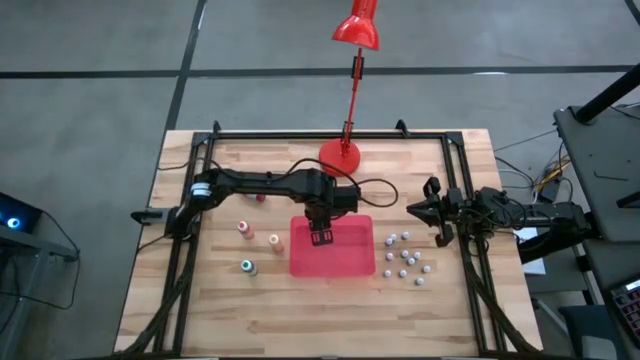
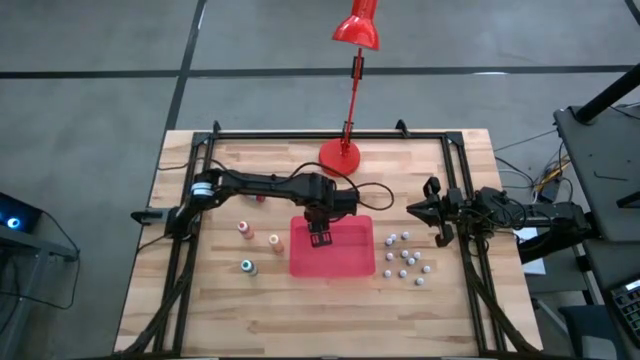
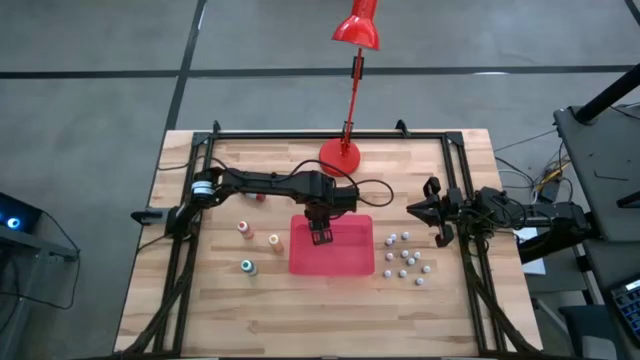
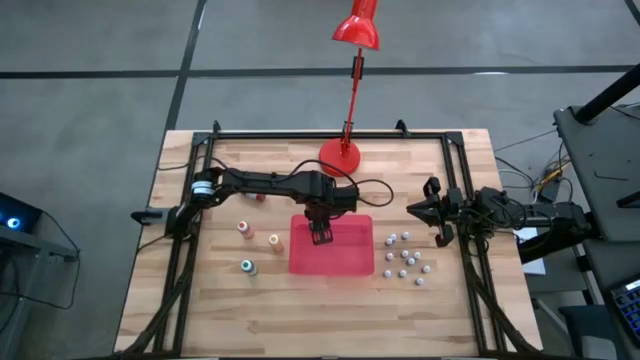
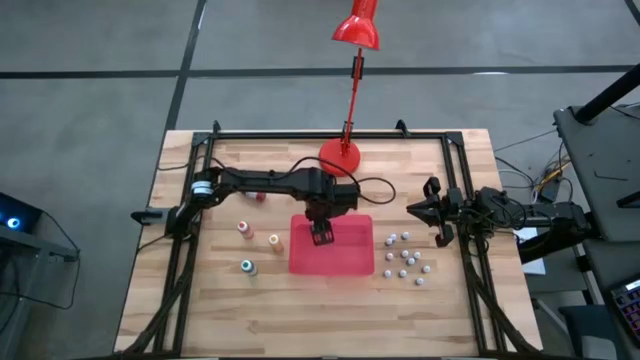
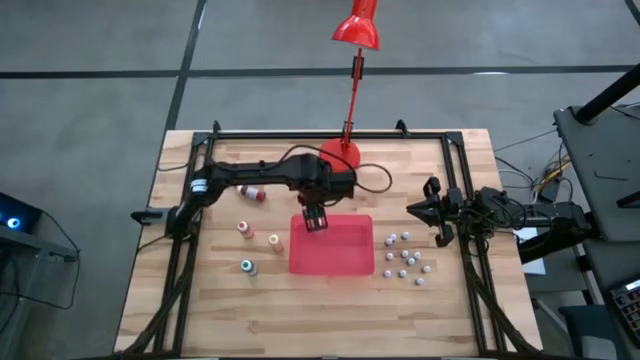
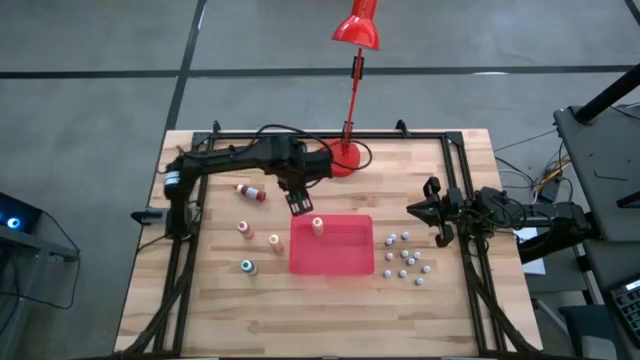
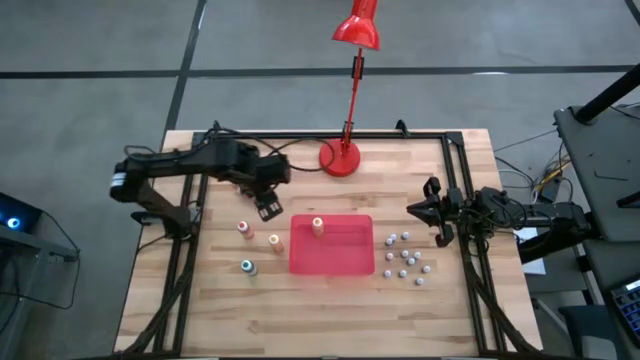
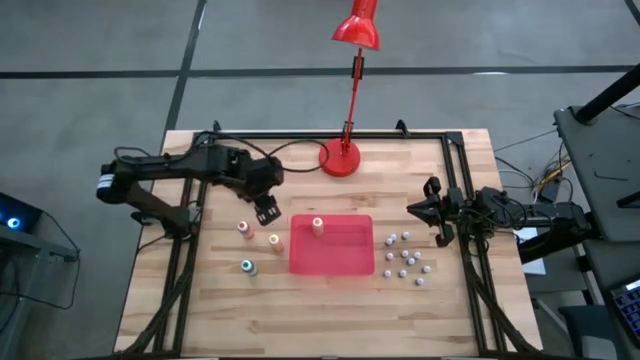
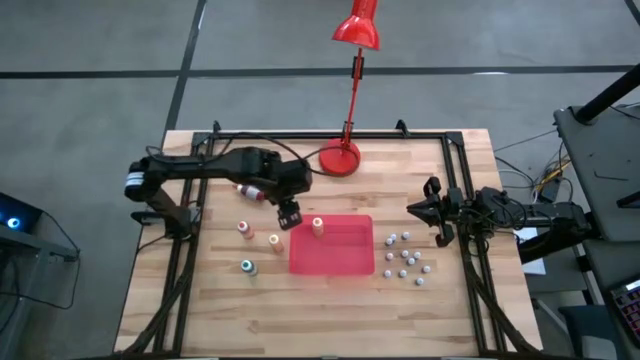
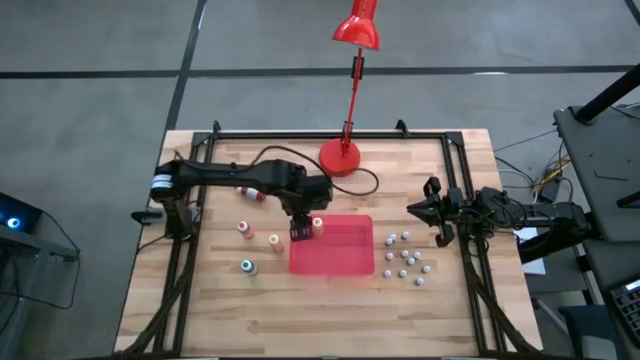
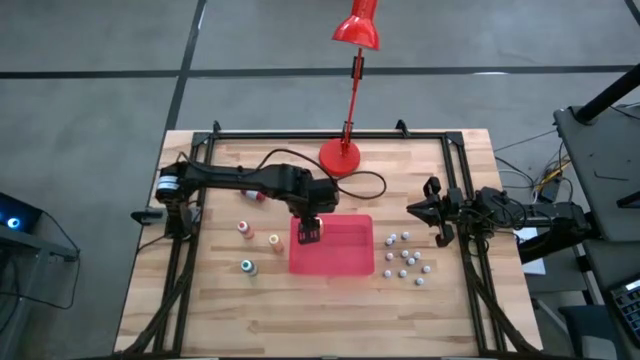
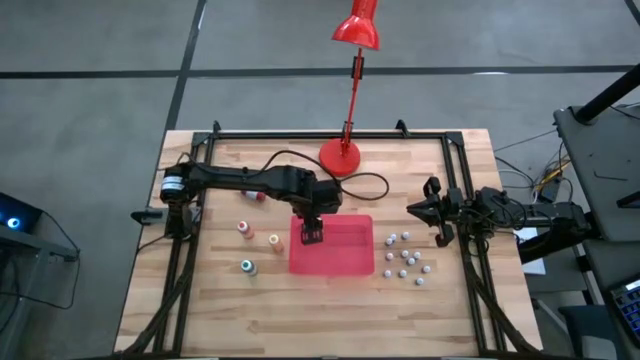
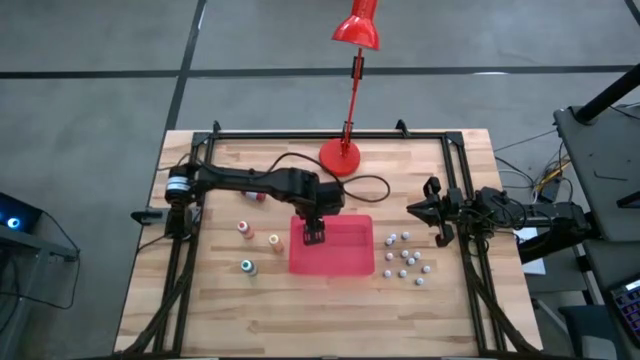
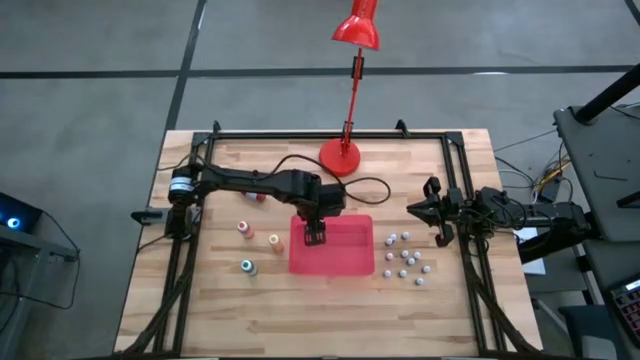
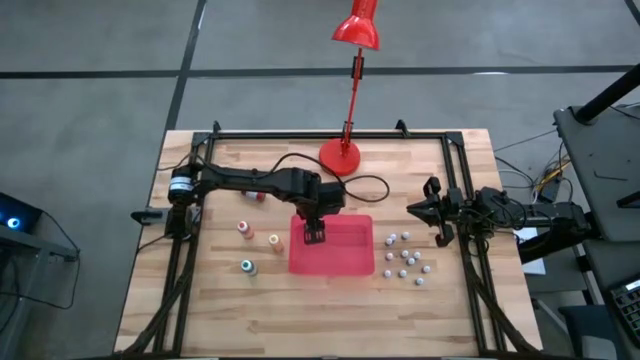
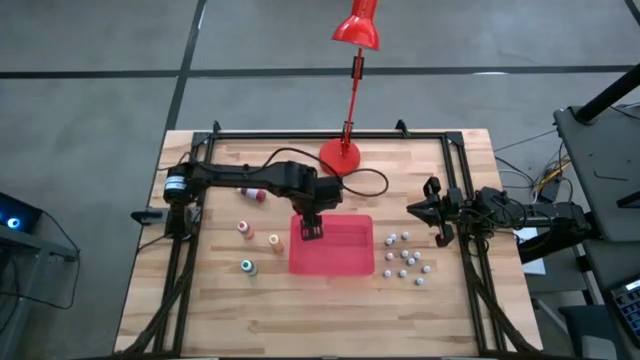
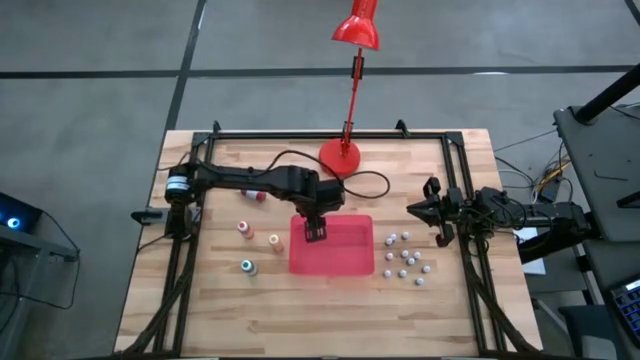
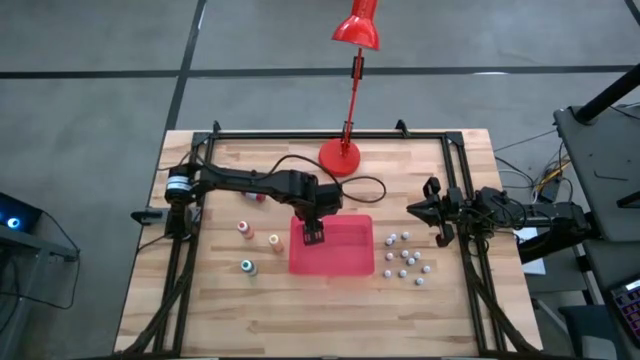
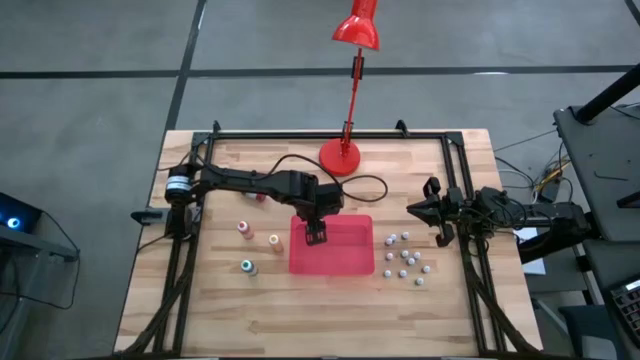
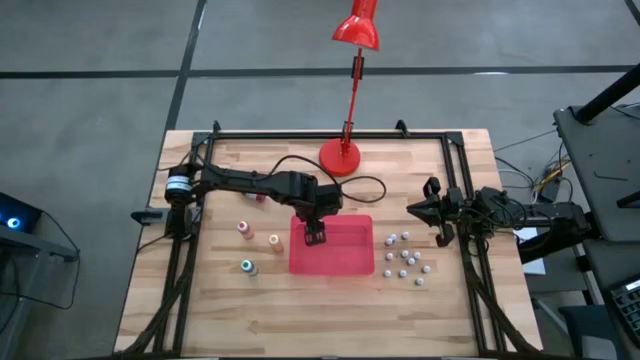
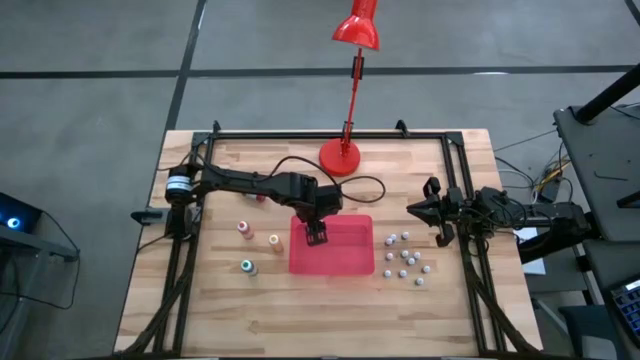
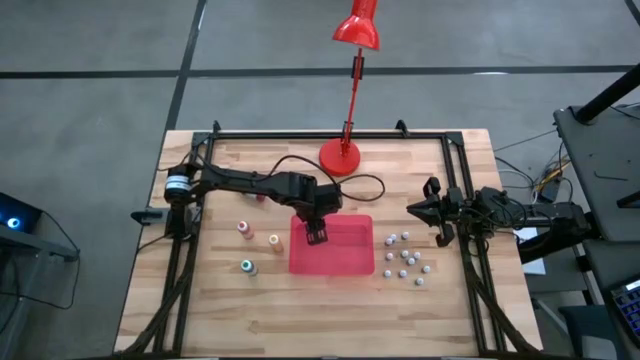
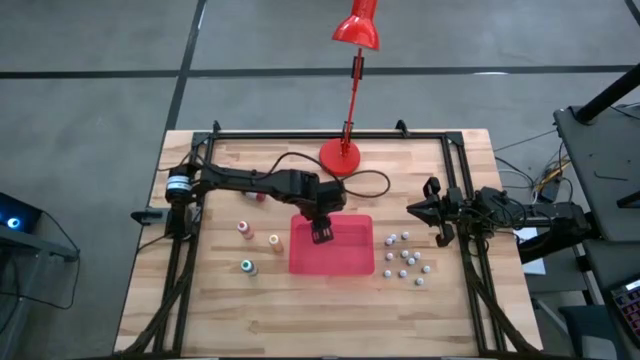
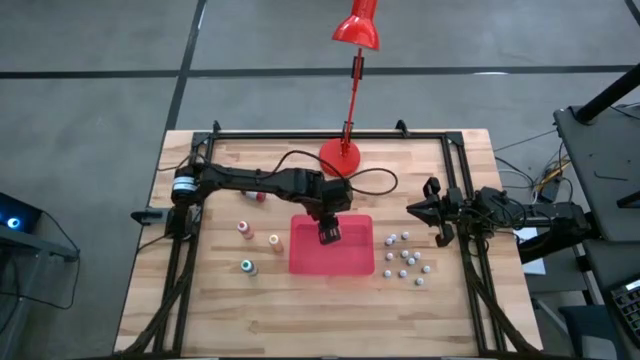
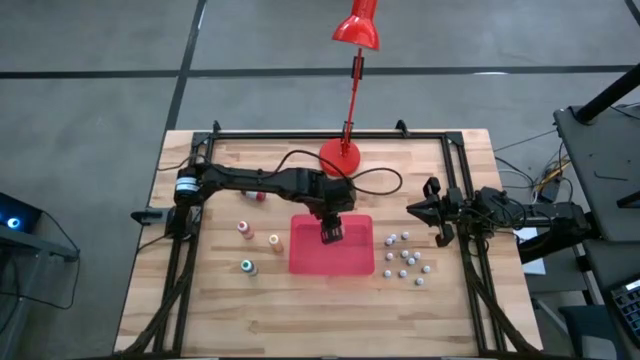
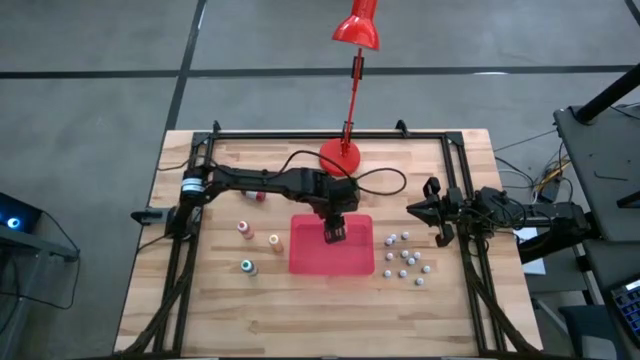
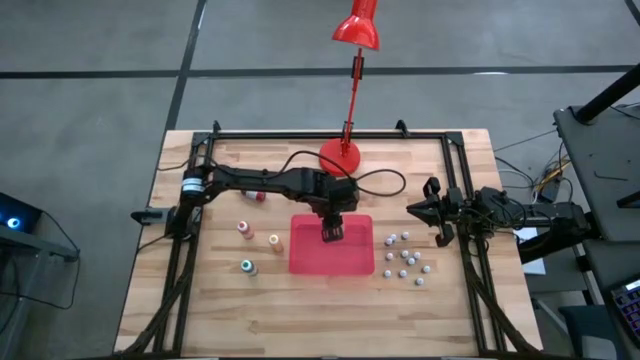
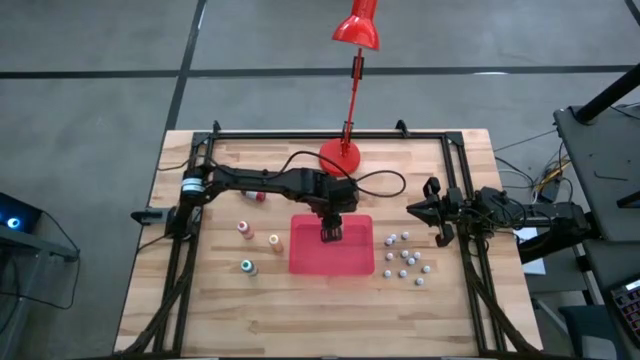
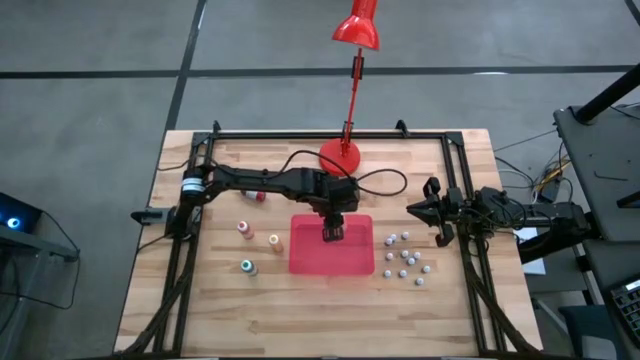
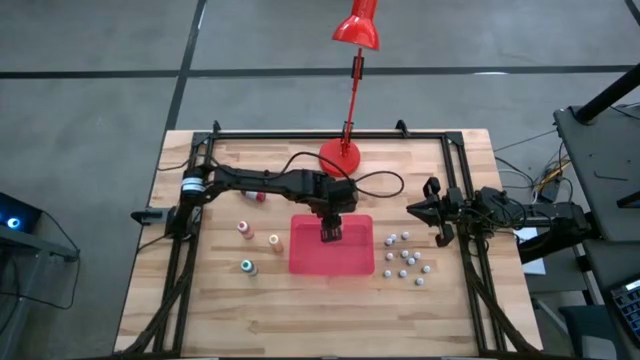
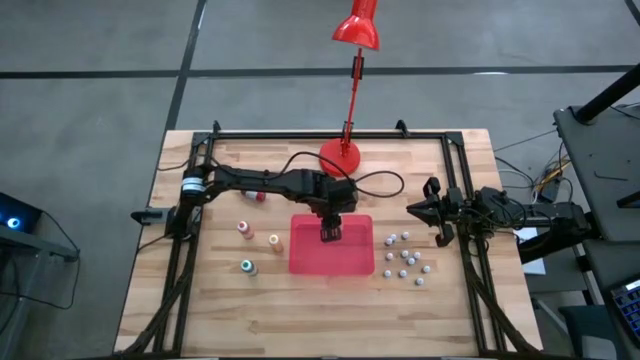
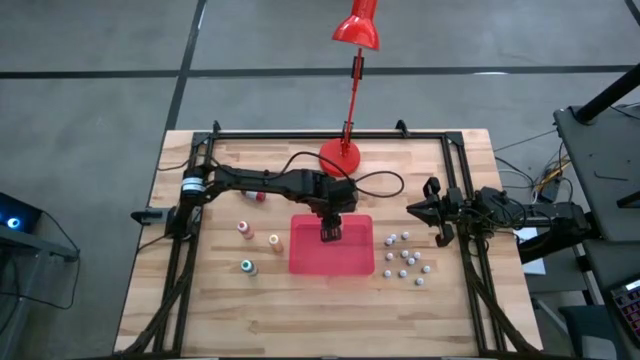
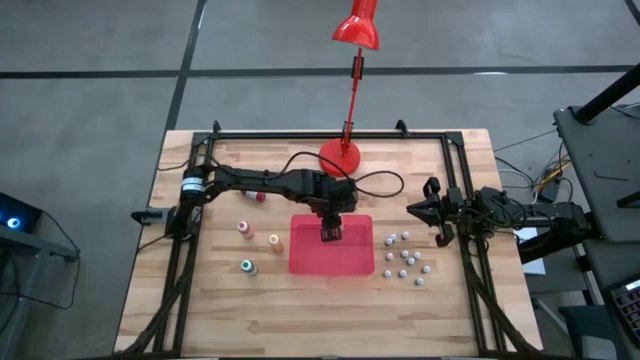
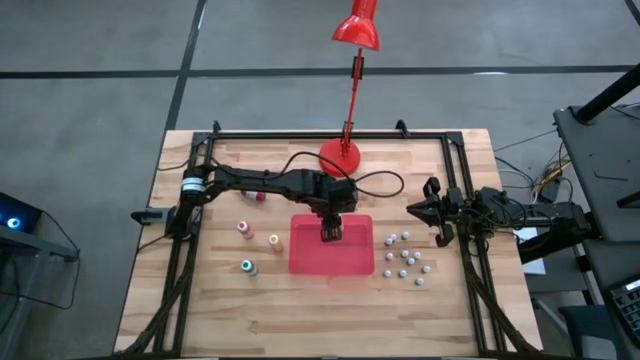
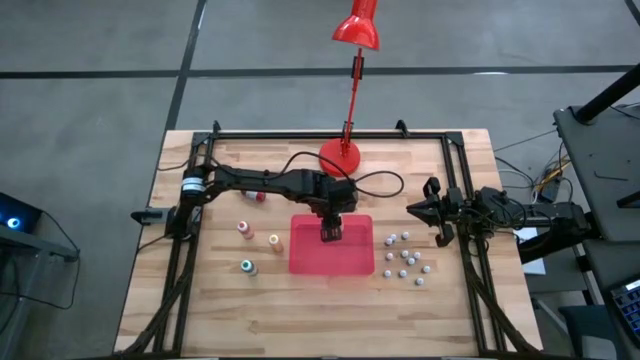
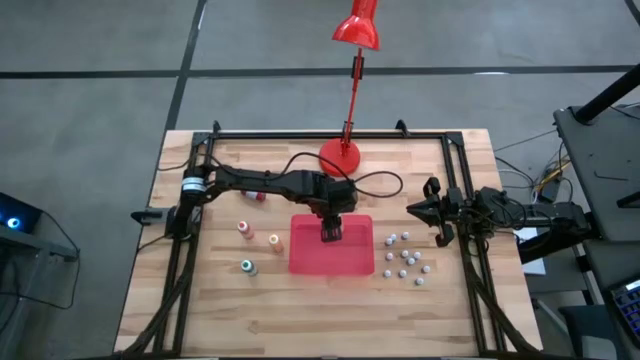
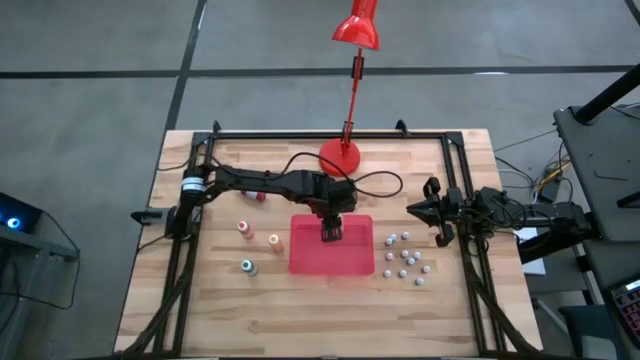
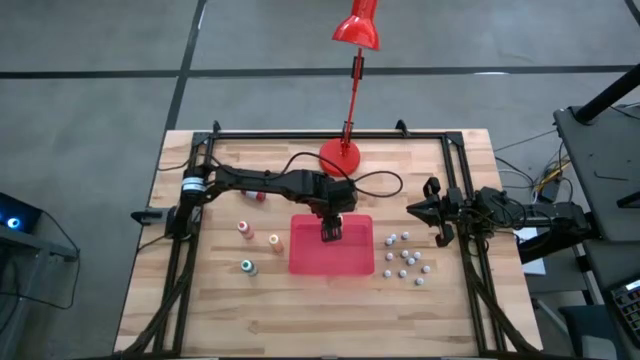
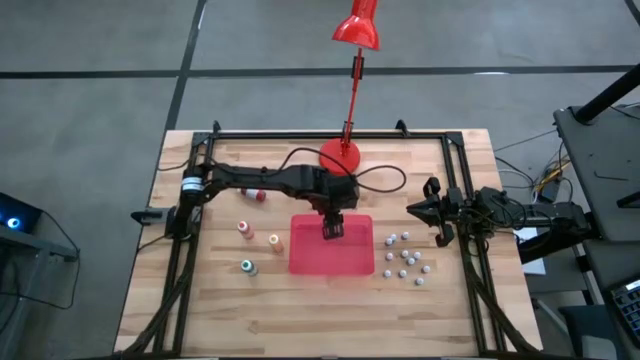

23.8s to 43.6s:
Task: Pick & Place food coloring
Put the top large yellow food coloring bottle into the red bin
